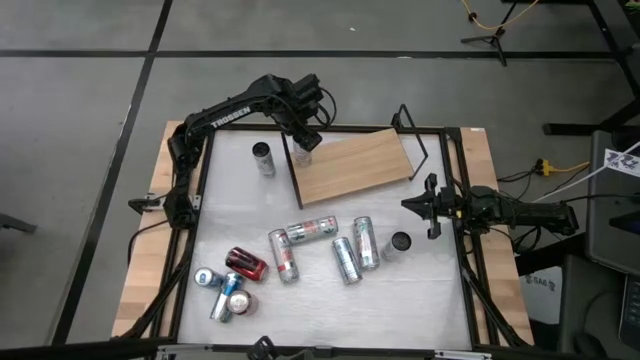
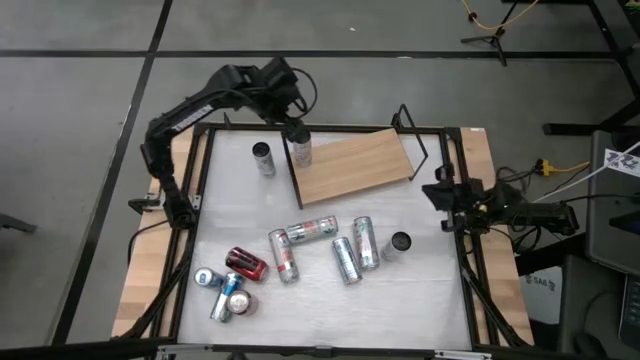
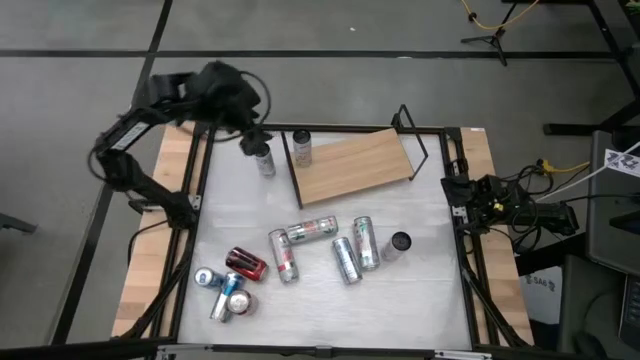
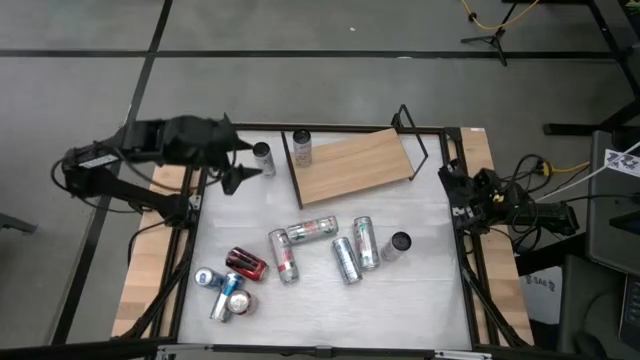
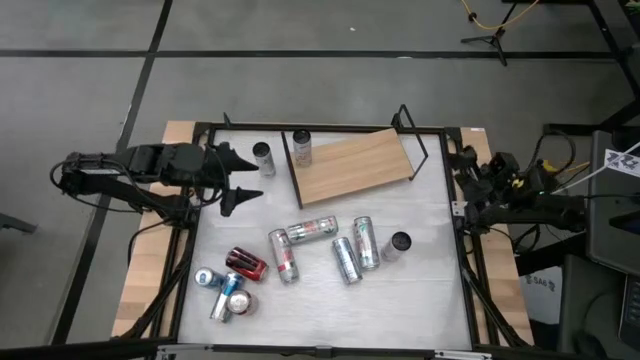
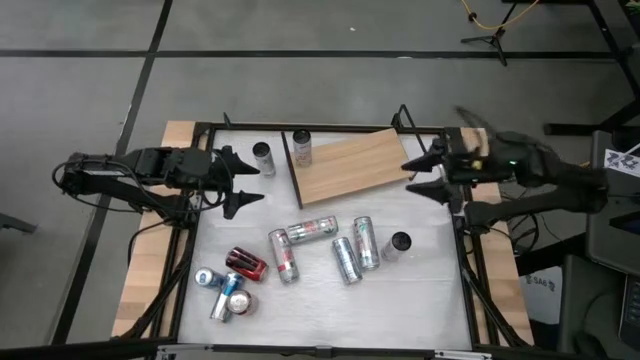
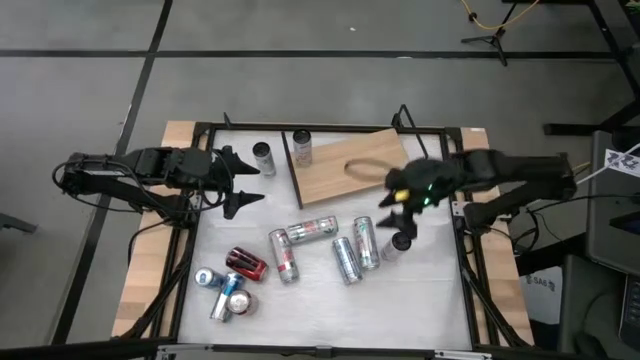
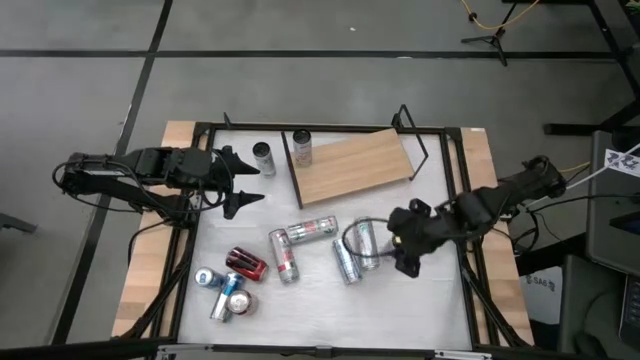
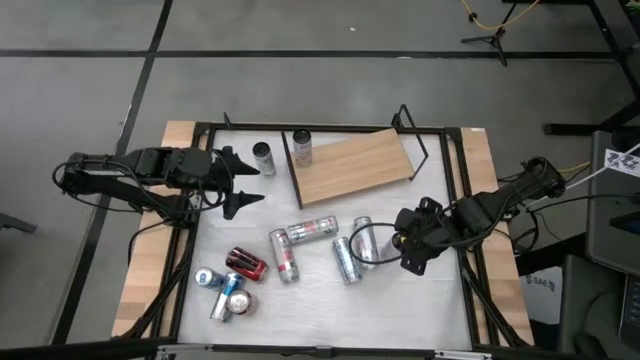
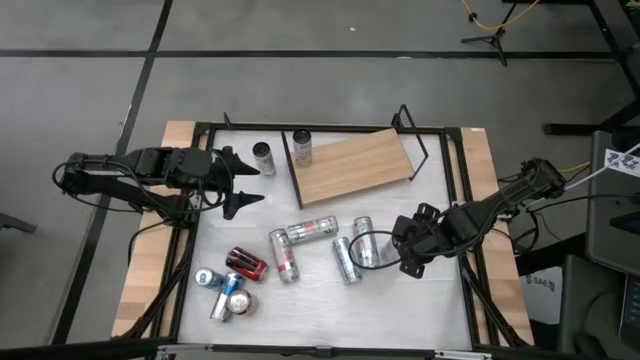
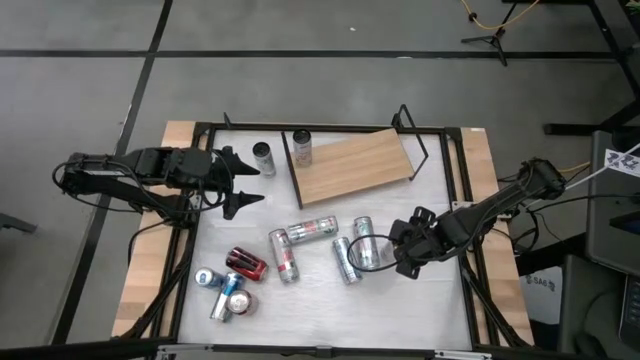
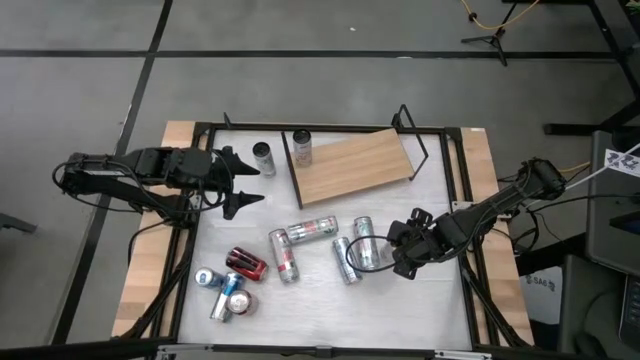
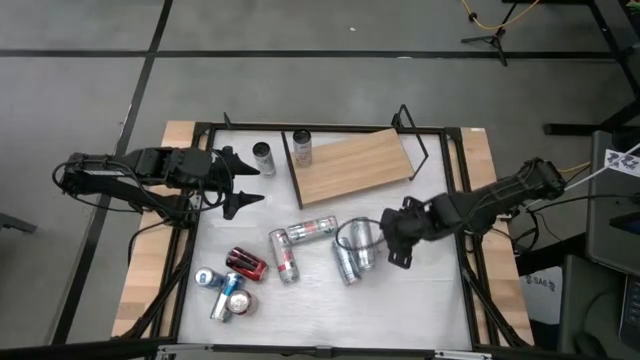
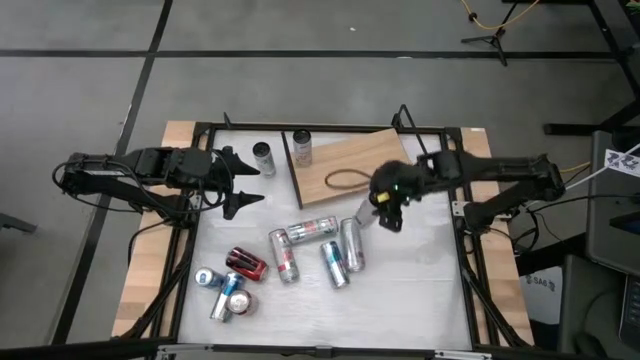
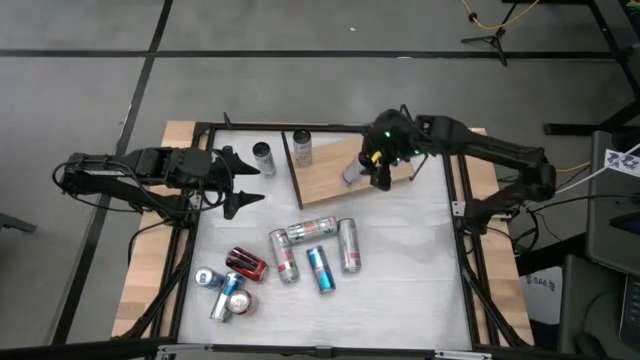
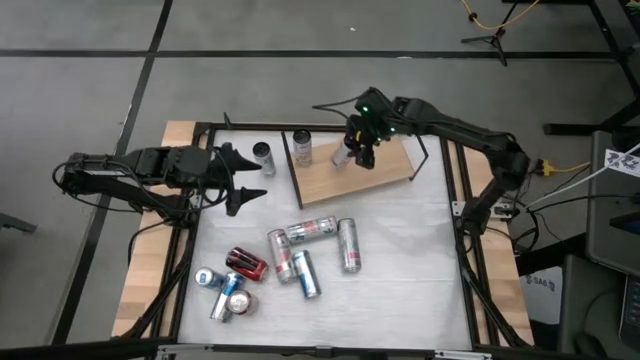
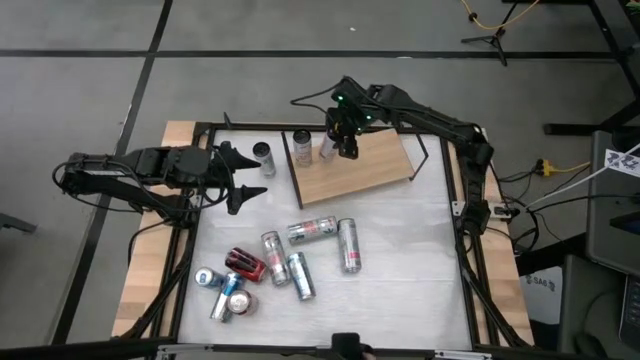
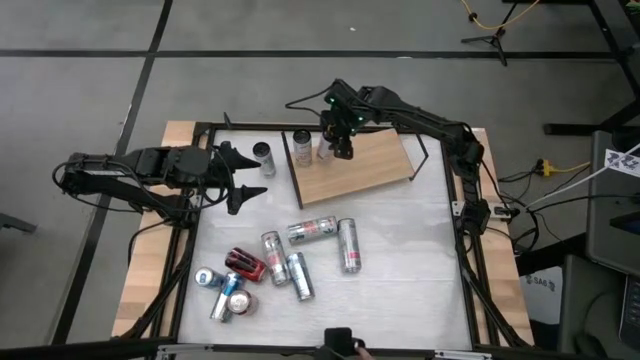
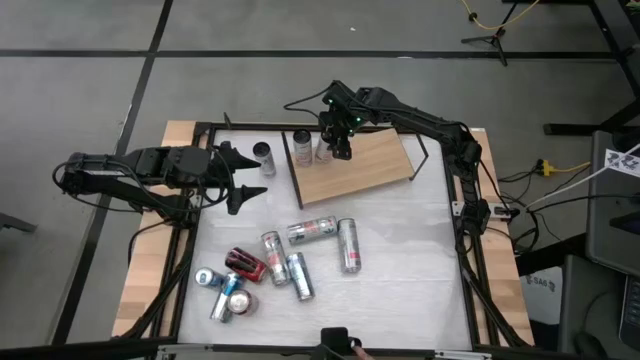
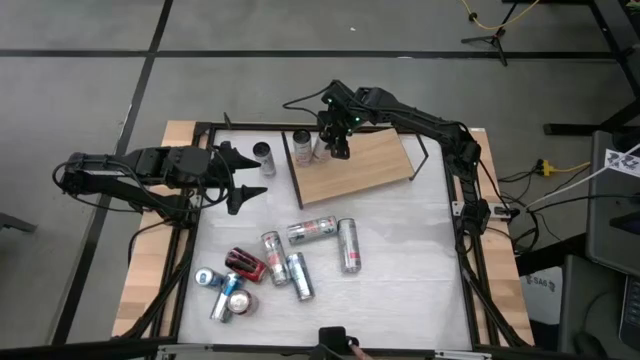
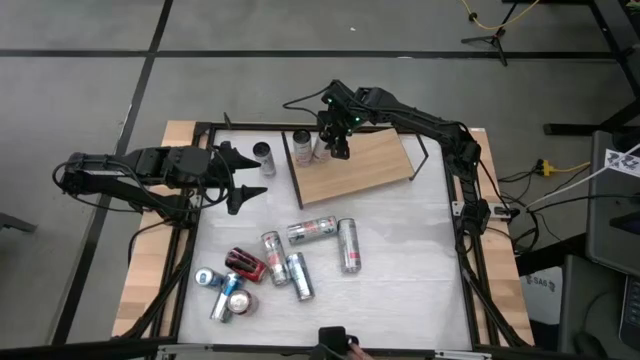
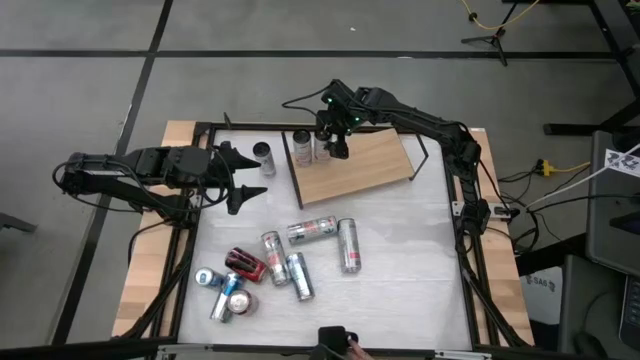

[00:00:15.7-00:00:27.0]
Task: Place canned beverage on shelf
Put the white pink soda can on the shelf aligned with the other white pink soda can

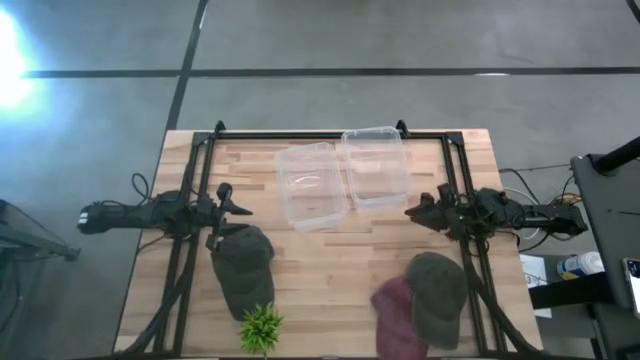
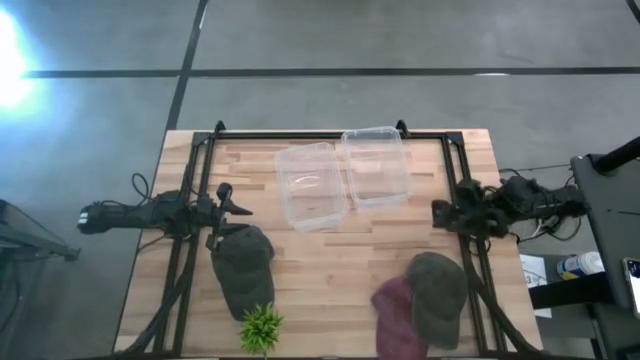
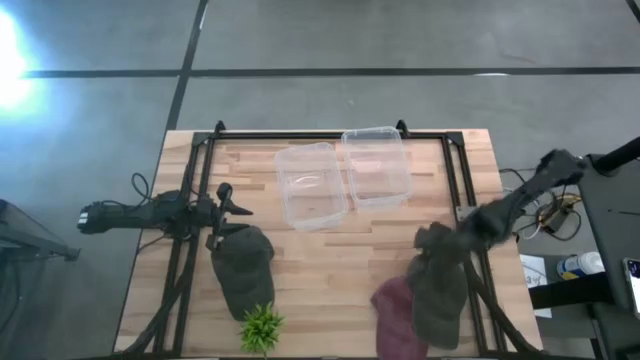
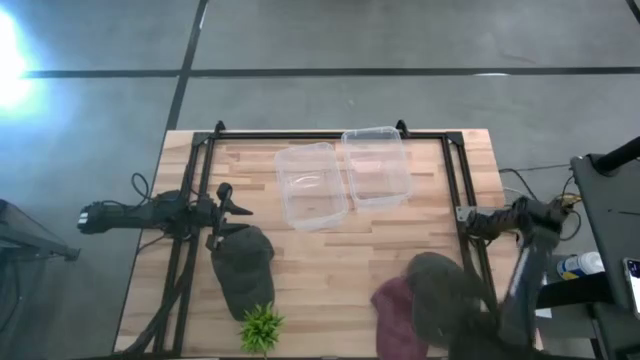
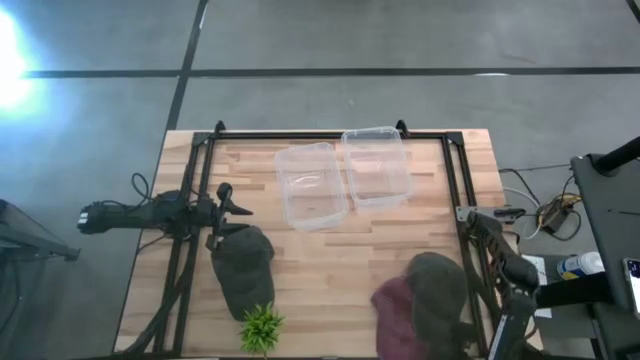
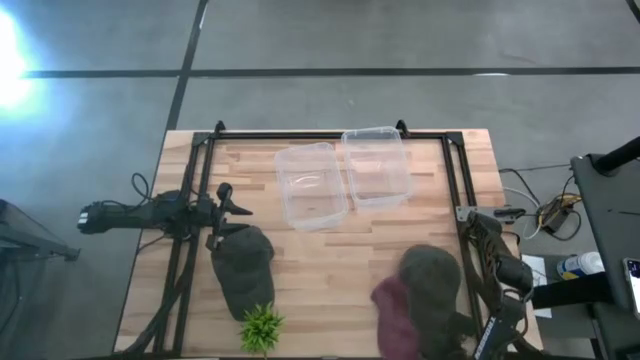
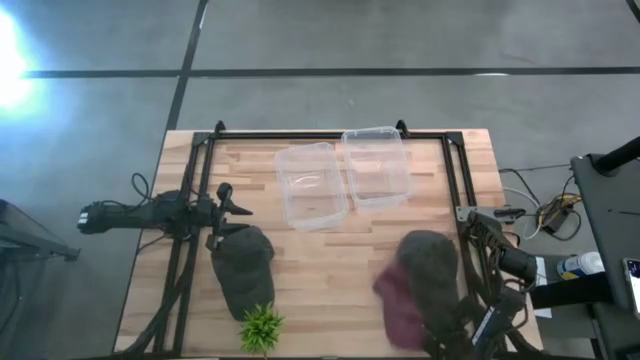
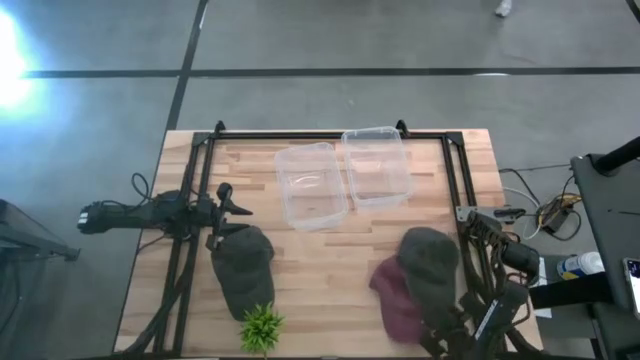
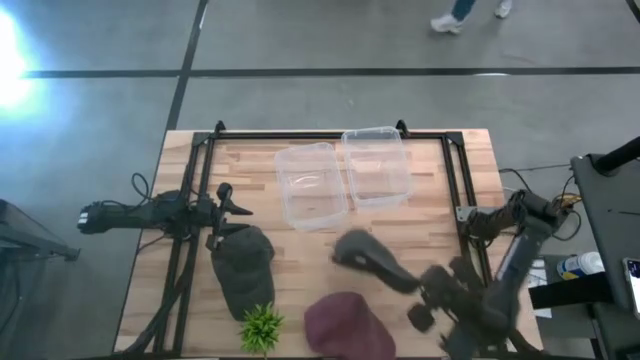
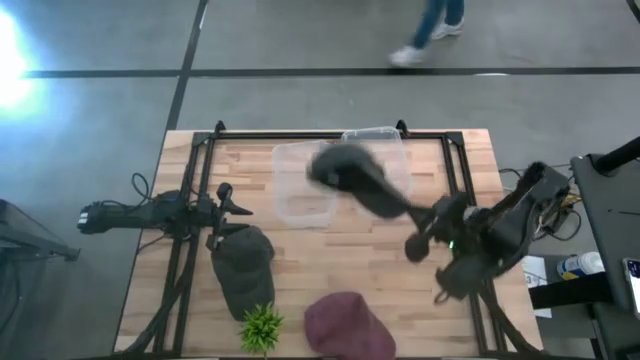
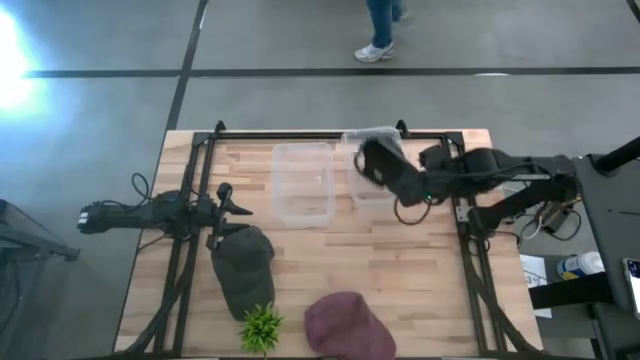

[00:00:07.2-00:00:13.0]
Task: Pick and place caps into container
Put the right black cap into the right transparent container

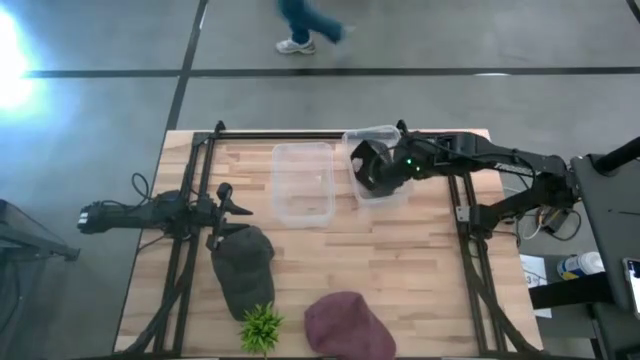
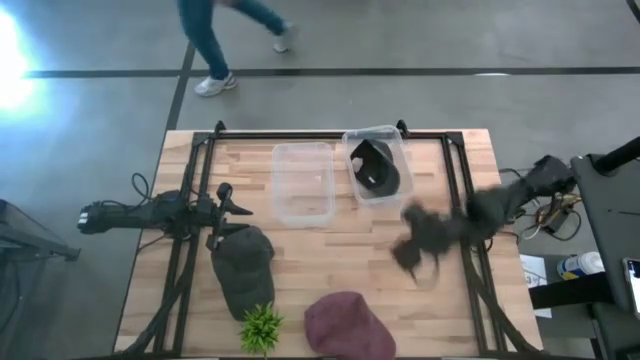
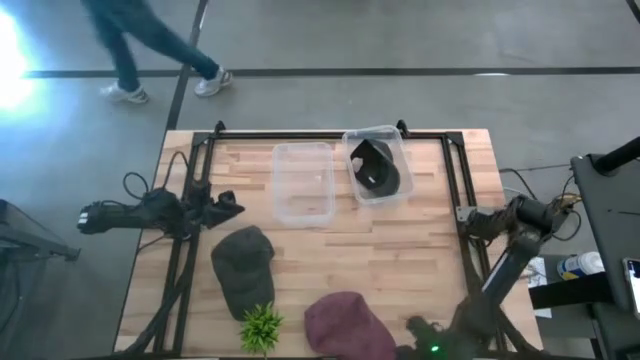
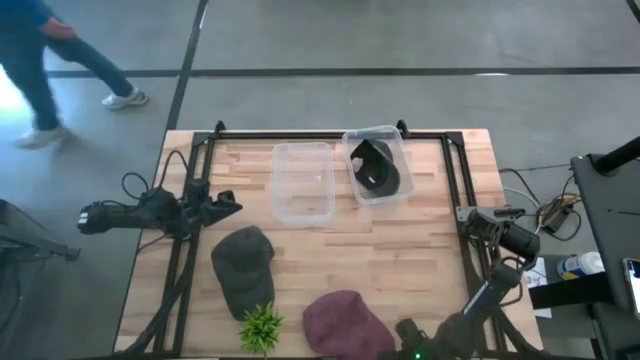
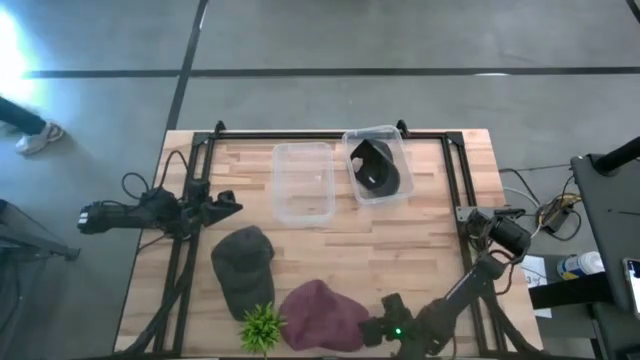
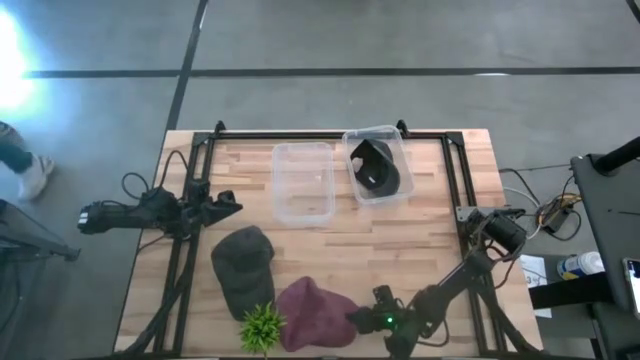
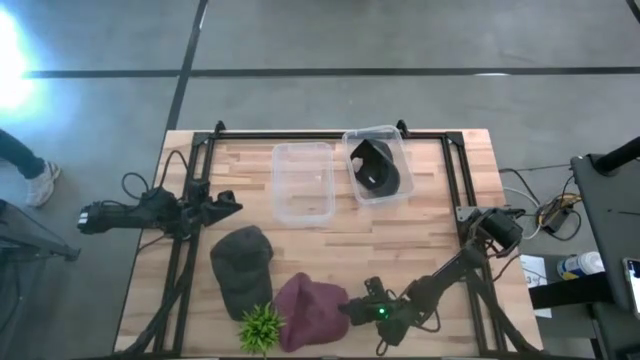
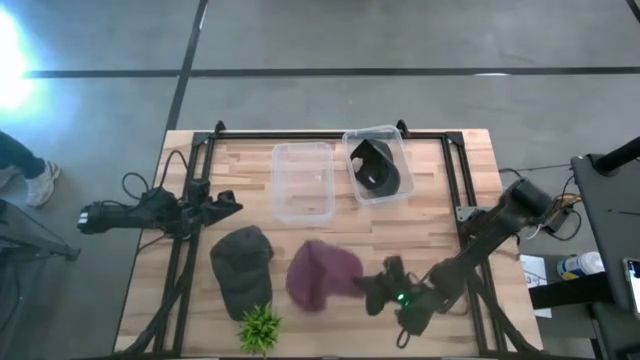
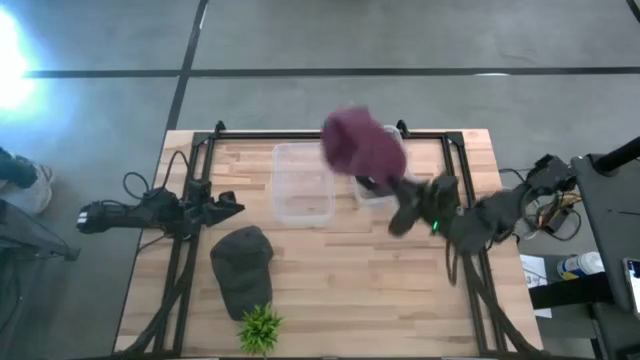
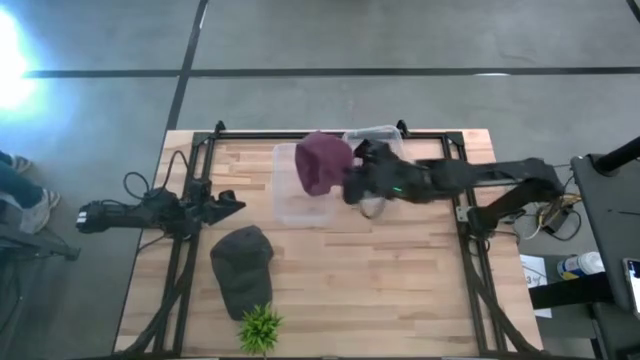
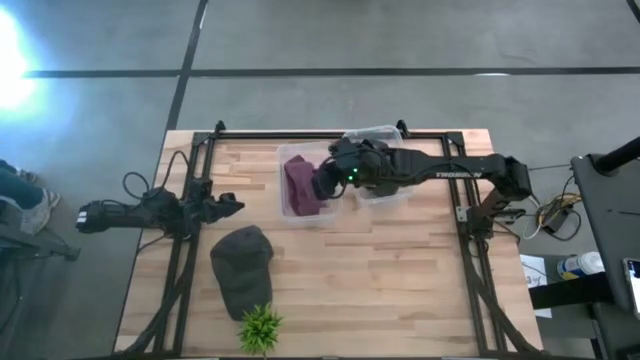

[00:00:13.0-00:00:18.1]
Put the red cap into the left transparent container
